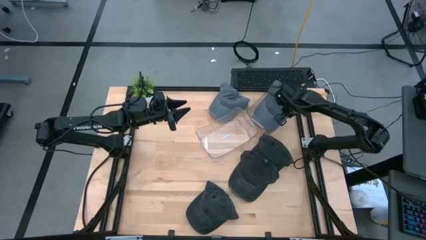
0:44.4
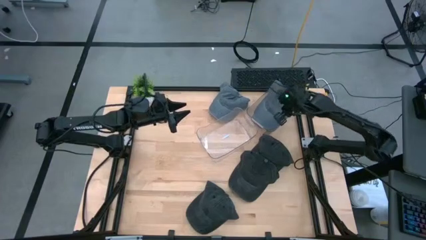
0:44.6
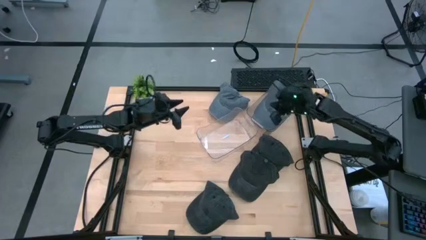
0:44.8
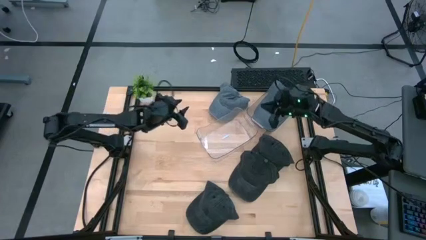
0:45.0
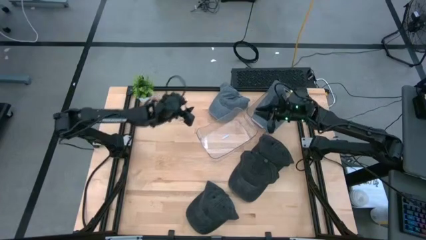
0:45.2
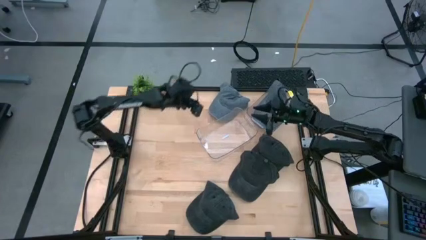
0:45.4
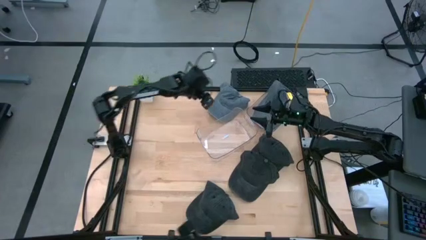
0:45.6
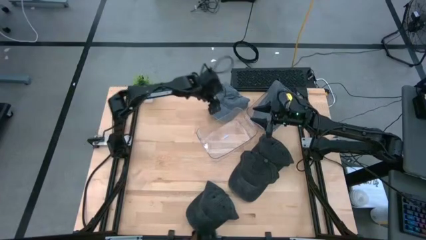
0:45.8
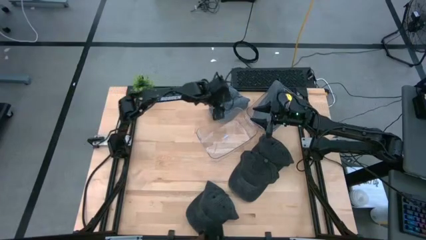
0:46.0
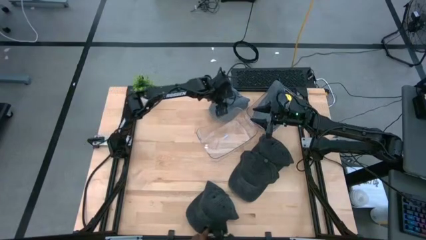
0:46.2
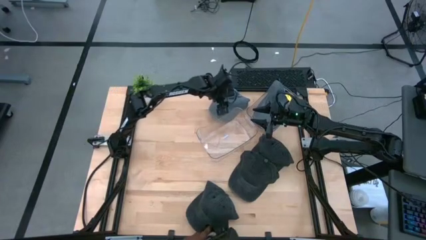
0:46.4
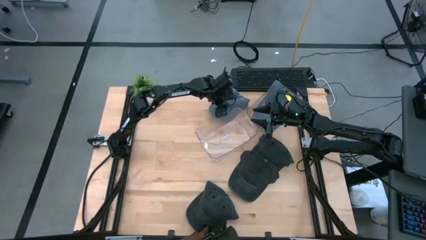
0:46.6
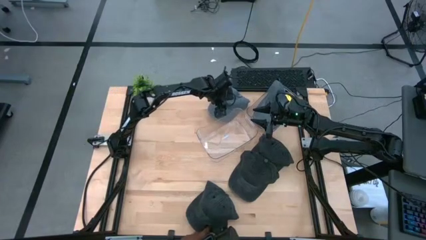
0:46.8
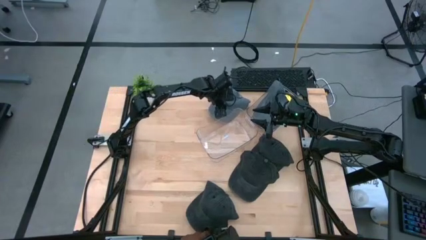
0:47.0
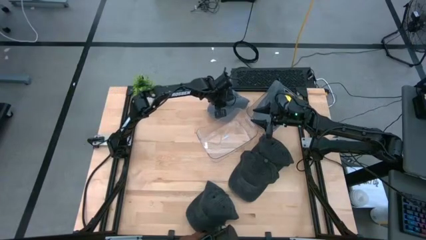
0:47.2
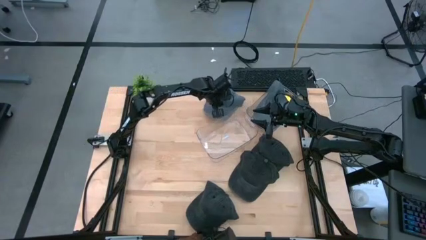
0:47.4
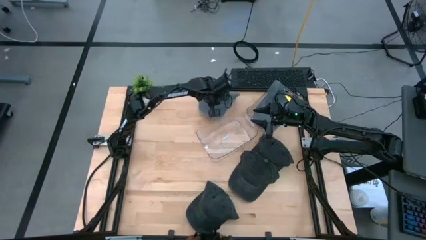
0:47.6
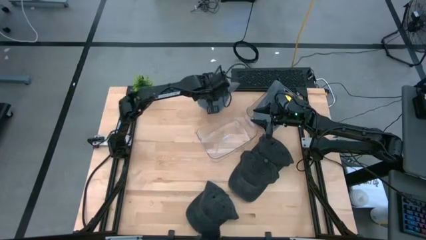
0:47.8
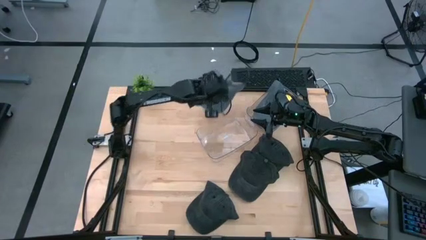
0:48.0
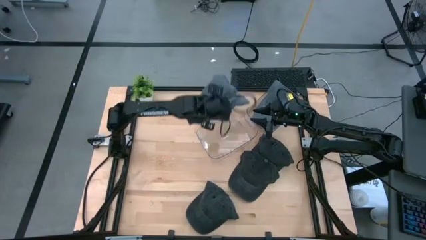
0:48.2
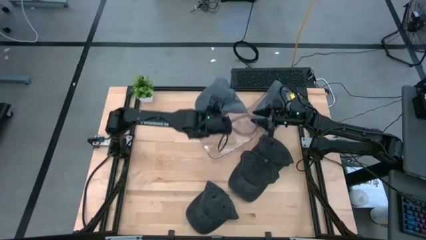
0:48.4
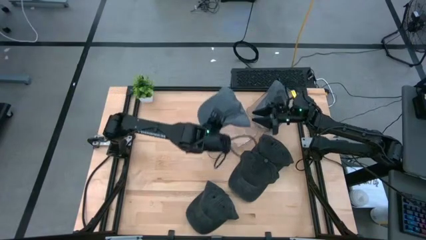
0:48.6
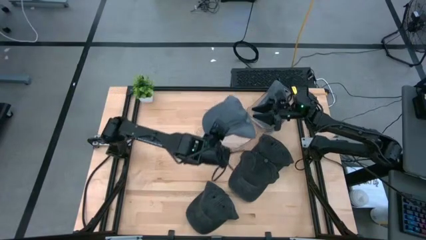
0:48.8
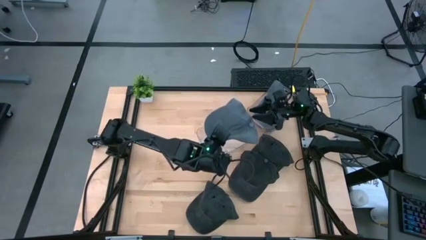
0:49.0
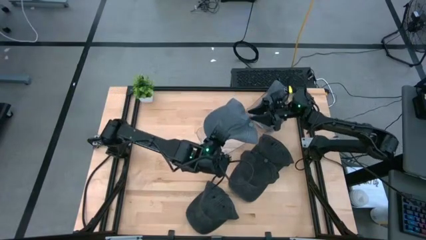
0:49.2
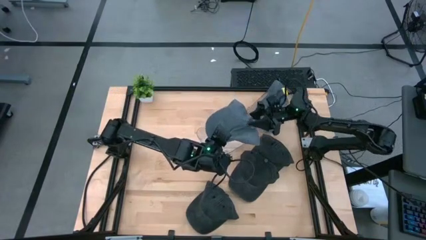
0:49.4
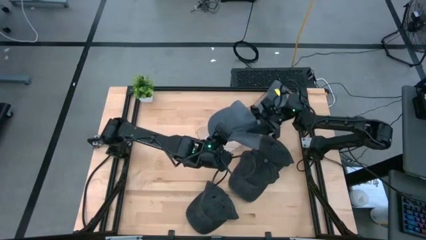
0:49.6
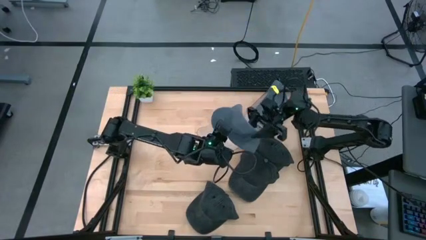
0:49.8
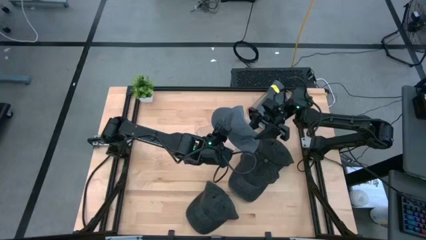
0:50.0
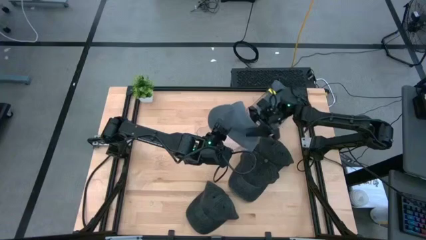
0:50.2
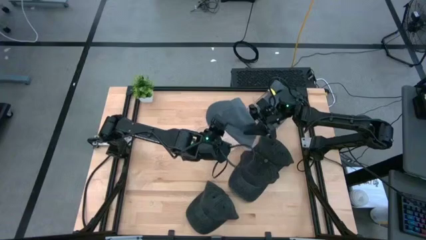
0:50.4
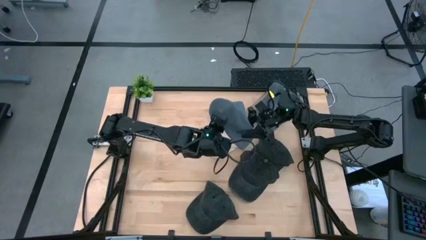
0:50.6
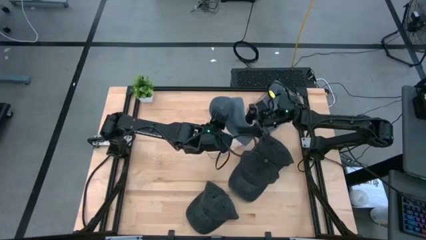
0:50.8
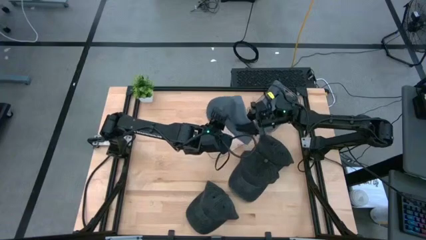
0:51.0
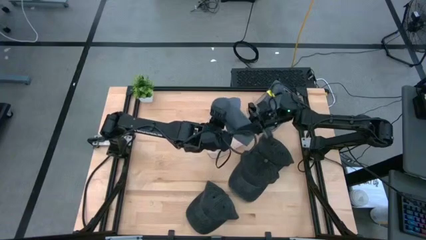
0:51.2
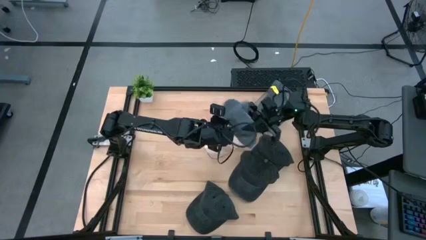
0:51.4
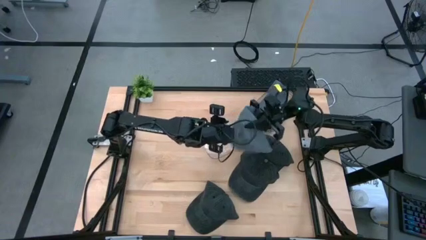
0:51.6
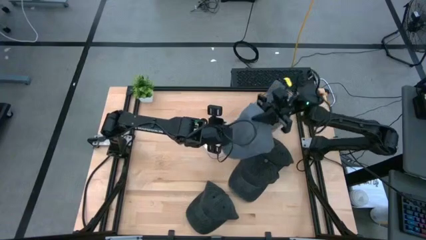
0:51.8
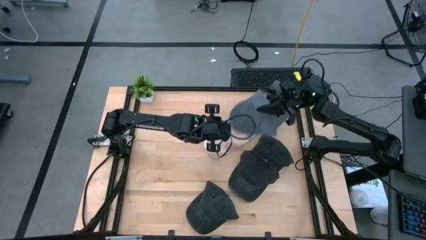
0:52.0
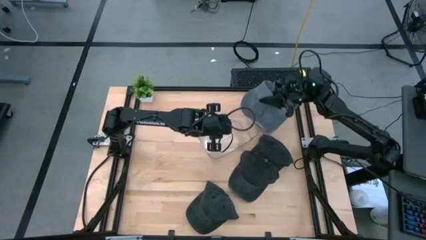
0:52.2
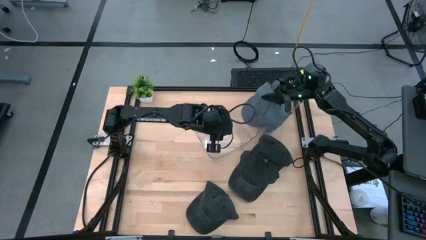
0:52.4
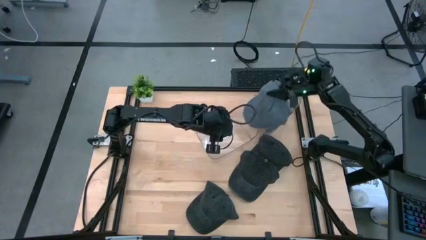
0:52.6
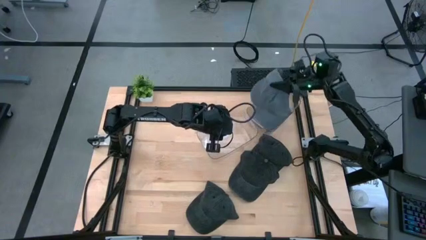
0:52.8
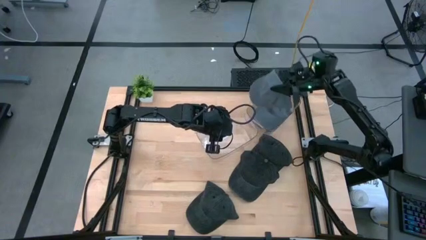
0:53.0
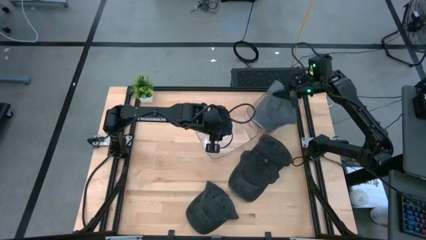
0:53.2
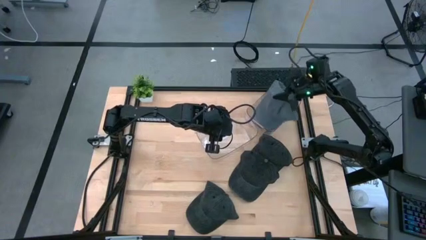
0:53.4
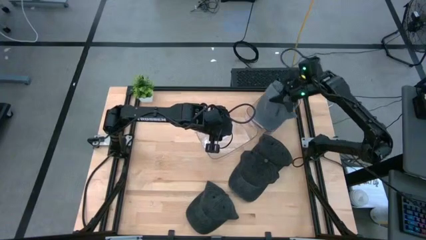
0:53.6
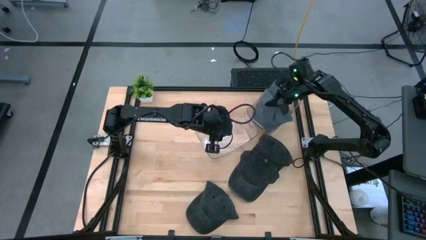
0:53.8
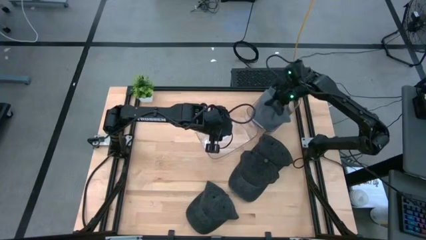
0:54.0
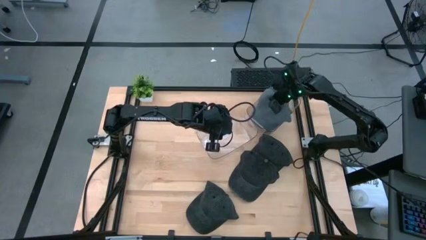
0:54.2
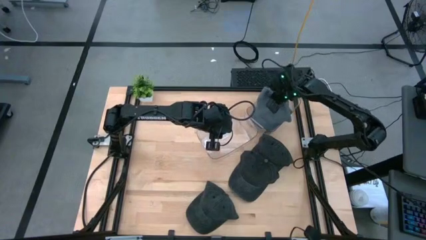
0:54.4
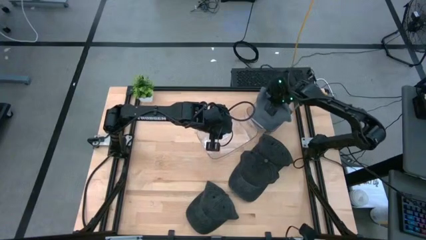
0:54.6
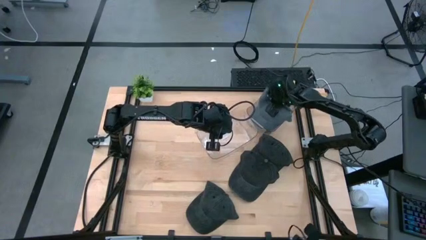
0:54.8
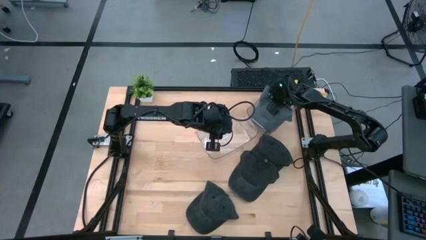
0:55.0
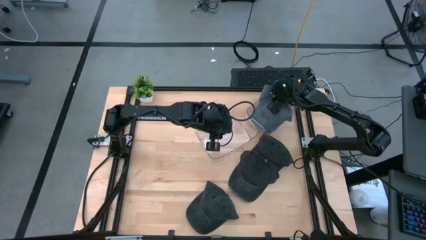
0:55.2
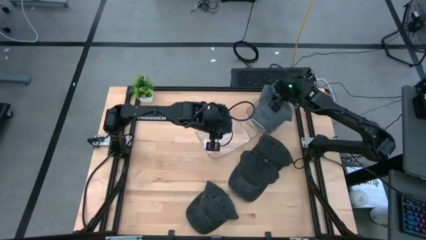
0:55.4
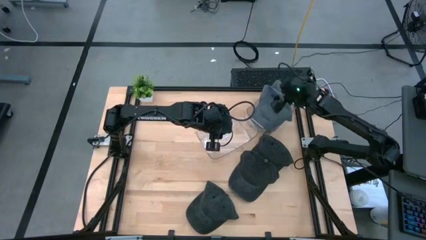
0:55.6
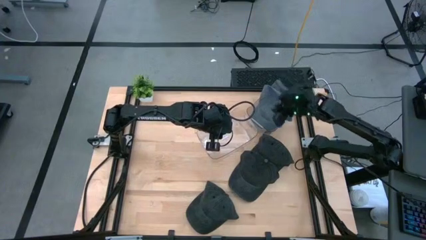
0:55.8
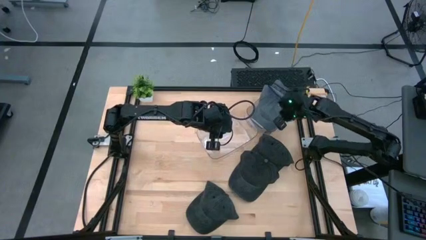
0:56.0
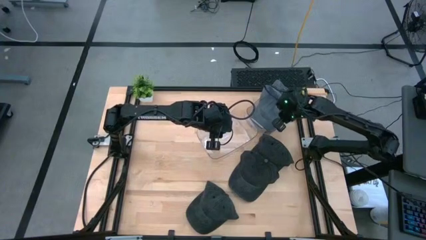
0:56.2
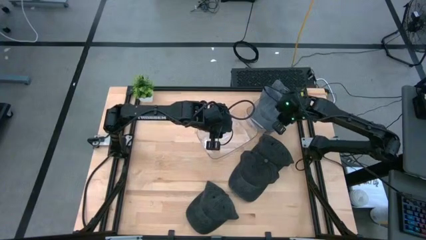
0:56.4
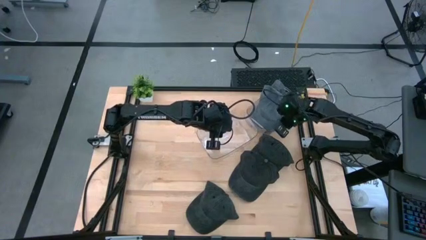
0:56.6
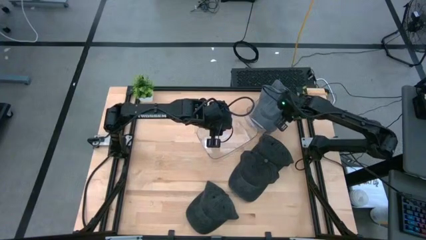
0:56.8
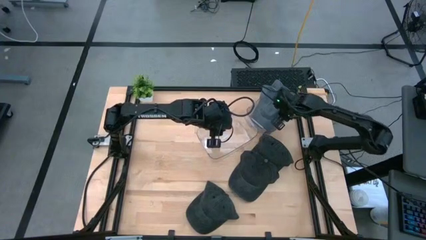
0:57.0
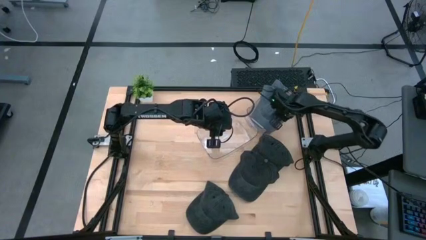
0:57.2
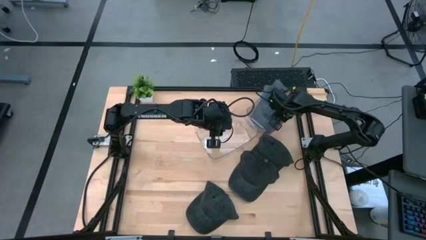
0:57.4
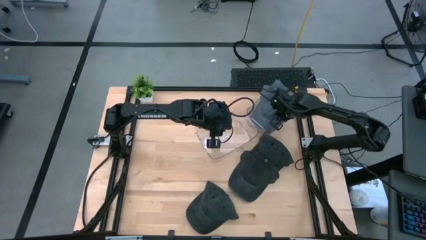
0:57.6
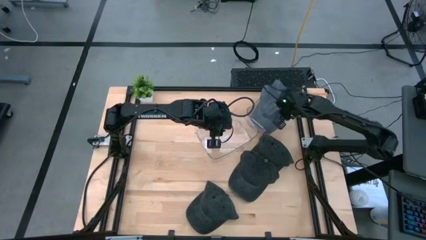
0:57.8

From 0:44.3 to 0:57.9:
Task: Pick & Place hat
Stack the gray cap on top of the gray cap in the right transparent bin

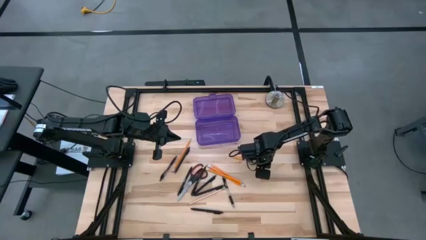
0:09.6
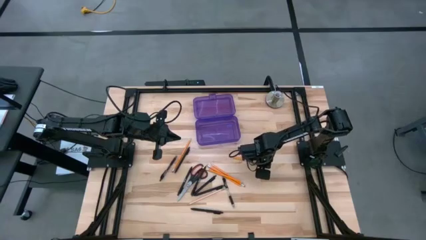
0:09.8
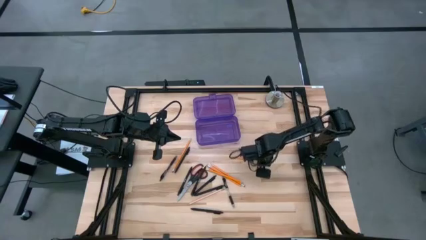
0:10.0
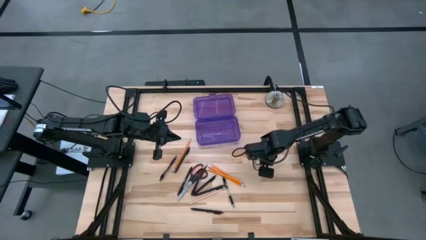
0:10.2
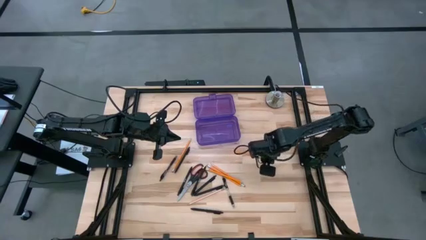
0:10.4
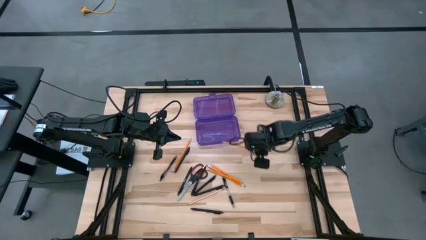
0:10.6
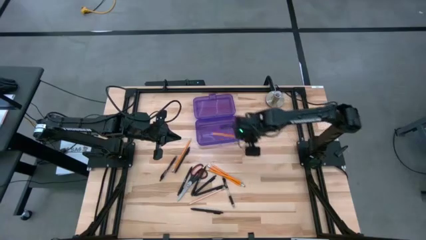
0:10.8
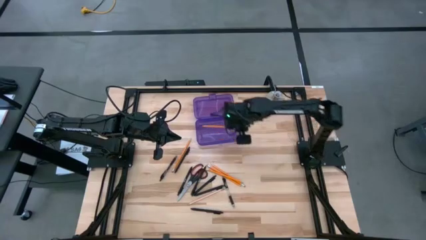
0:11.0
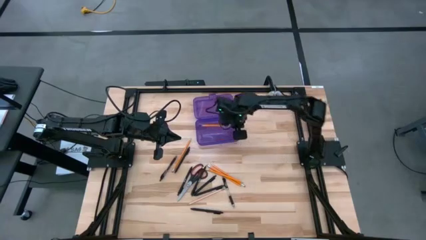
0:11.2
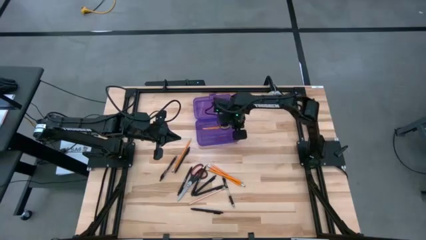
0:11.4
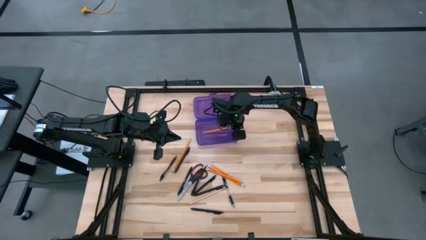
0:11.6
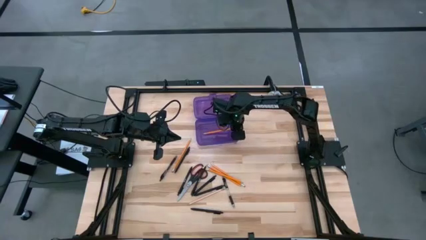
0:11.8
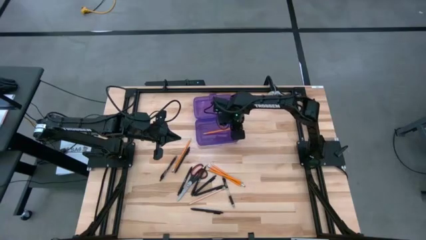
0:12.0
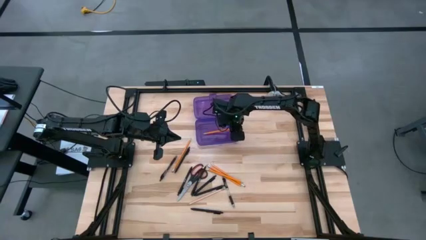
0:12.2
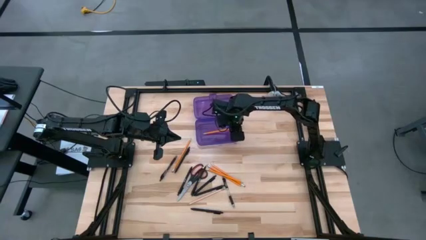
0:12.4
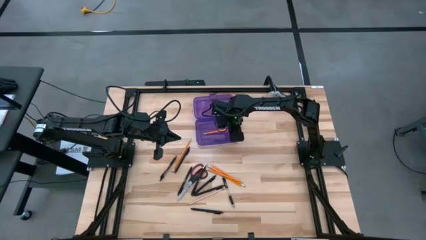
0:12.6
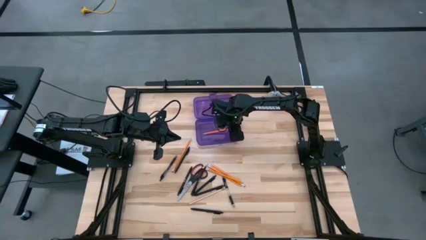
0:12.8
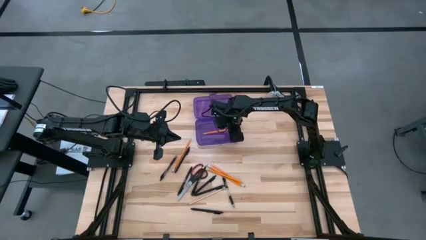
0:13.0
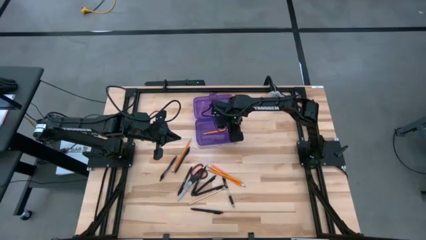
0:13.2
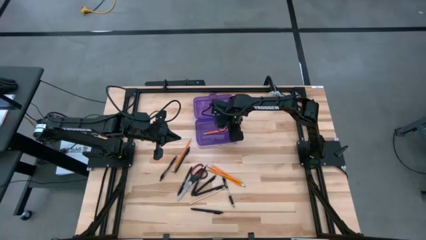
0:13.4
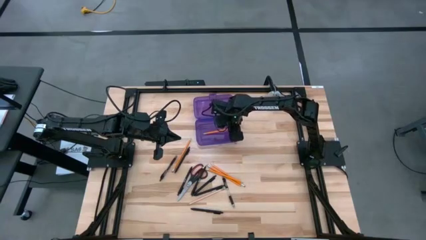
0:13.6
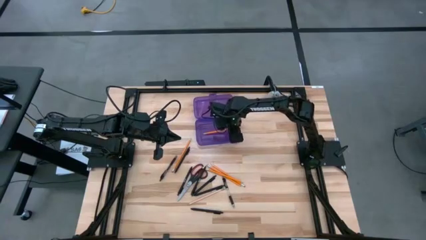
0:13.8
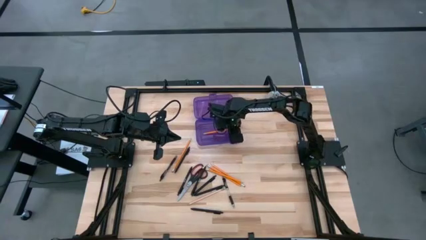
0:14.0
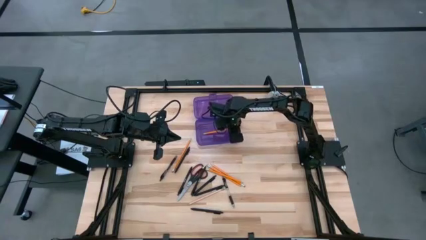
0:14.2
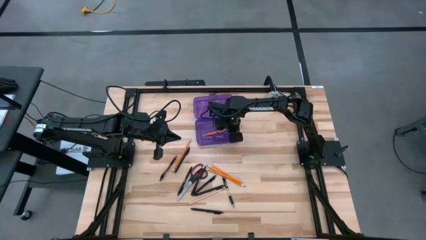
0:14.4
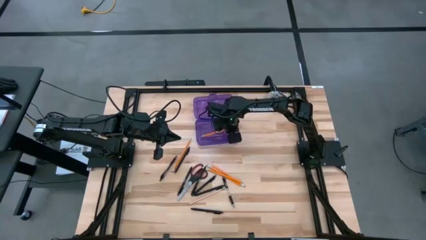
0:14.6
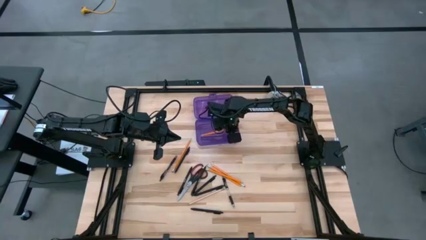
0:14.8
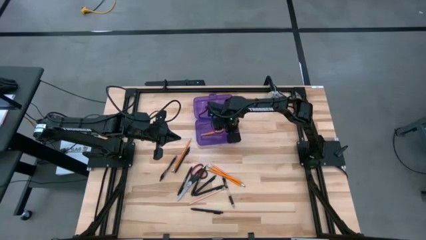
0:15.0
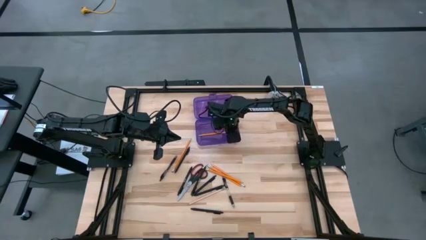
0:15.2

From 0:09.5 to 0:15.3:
Task: Pick & place school supplies into a supply box
Put the yellow pencil into the purple supply box
